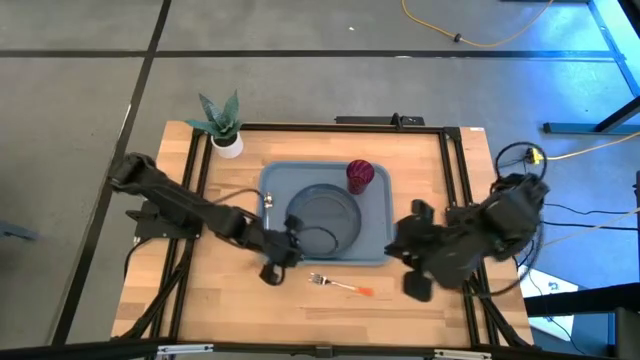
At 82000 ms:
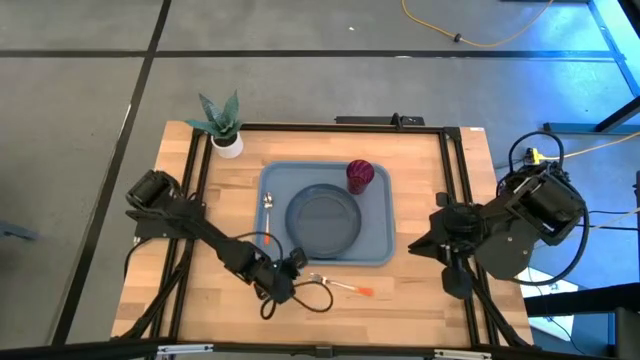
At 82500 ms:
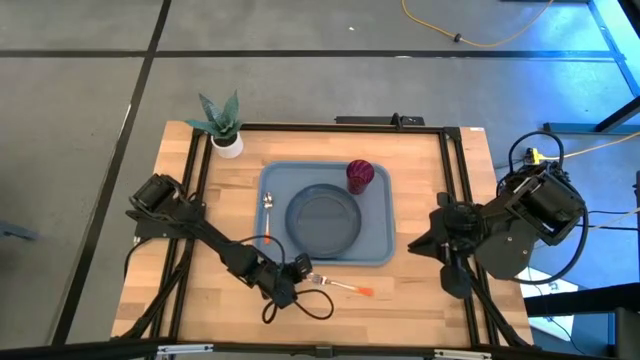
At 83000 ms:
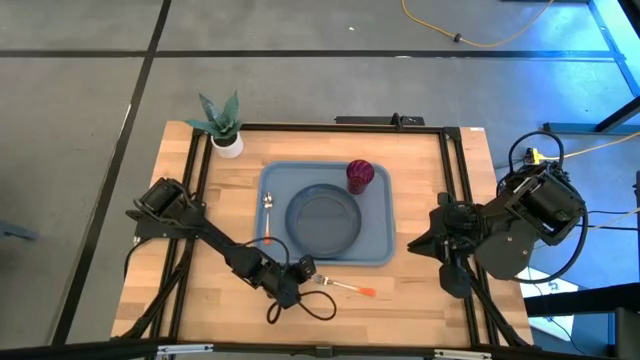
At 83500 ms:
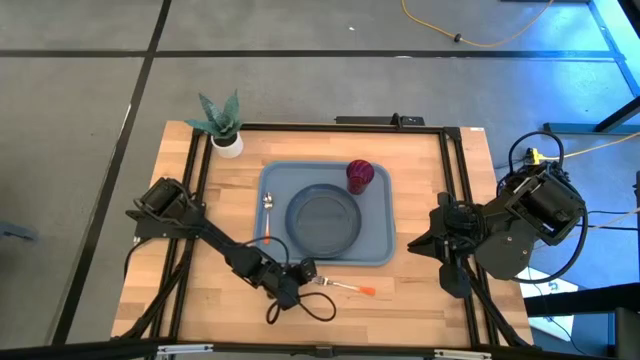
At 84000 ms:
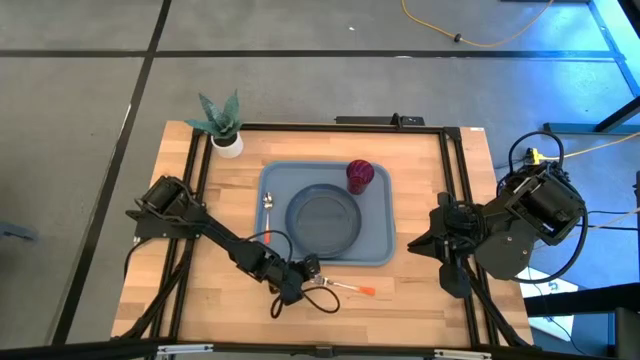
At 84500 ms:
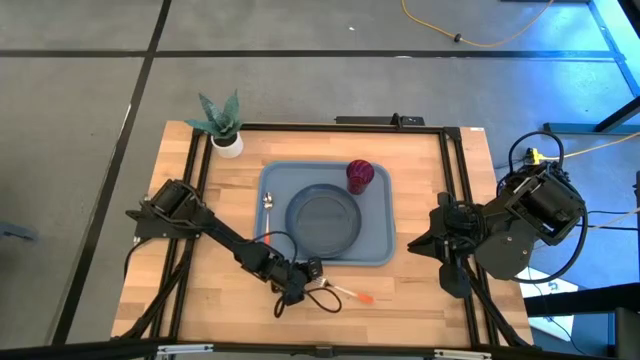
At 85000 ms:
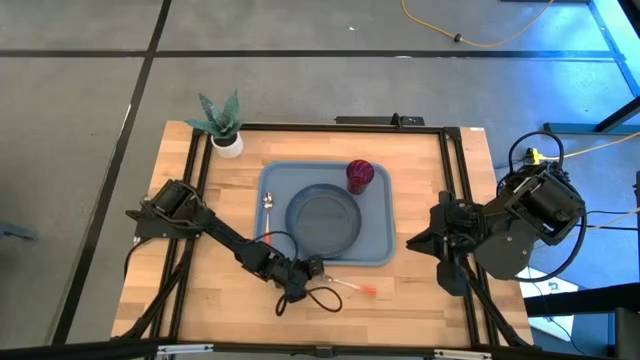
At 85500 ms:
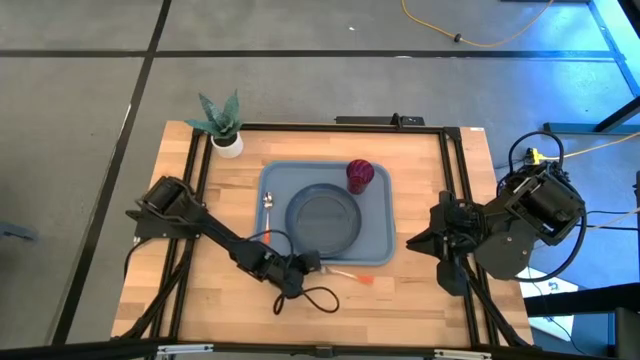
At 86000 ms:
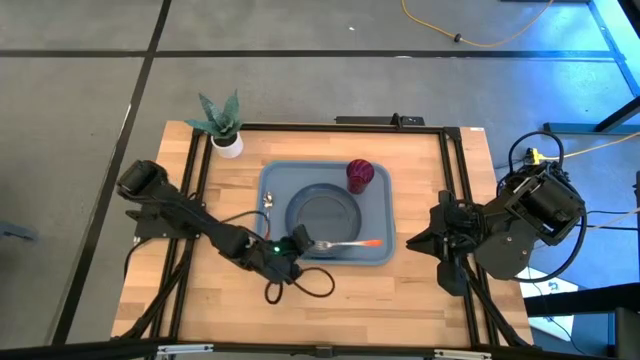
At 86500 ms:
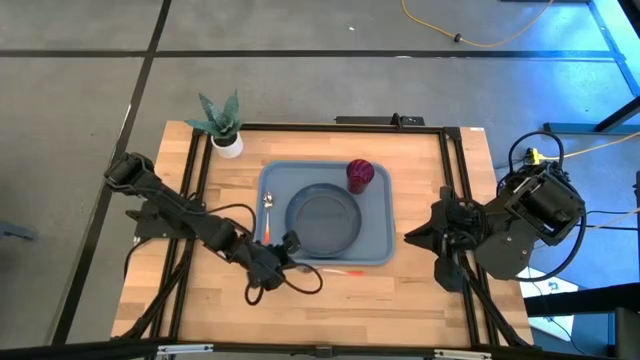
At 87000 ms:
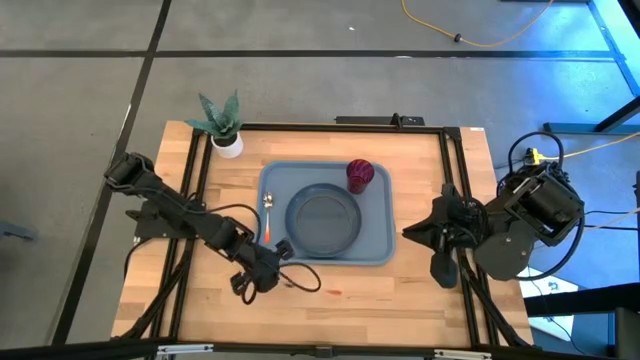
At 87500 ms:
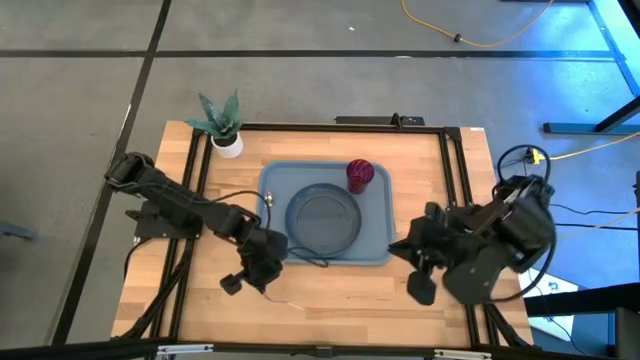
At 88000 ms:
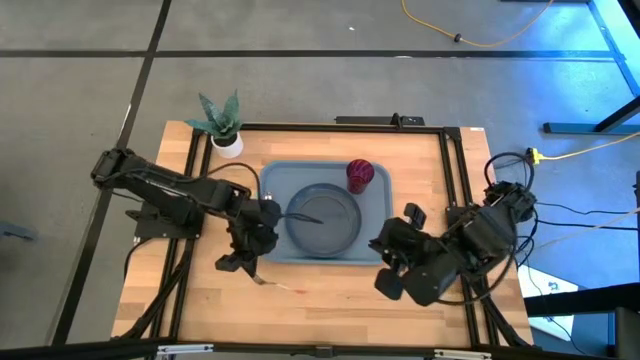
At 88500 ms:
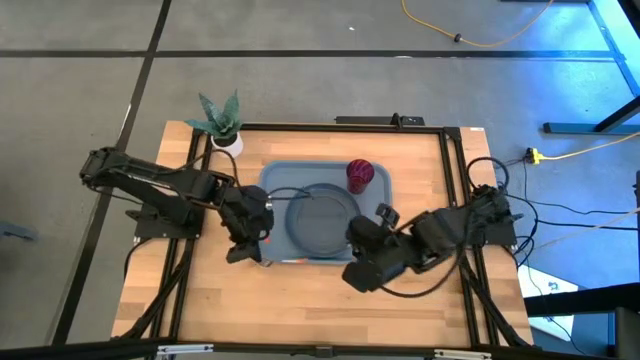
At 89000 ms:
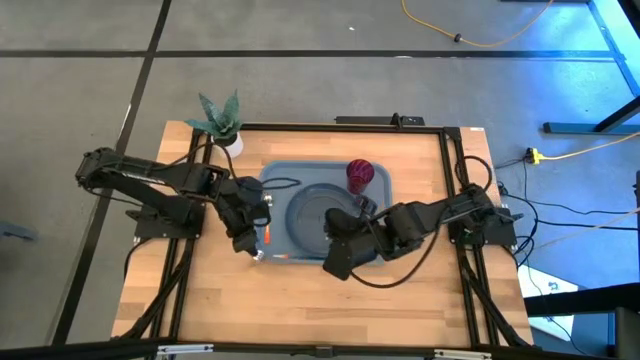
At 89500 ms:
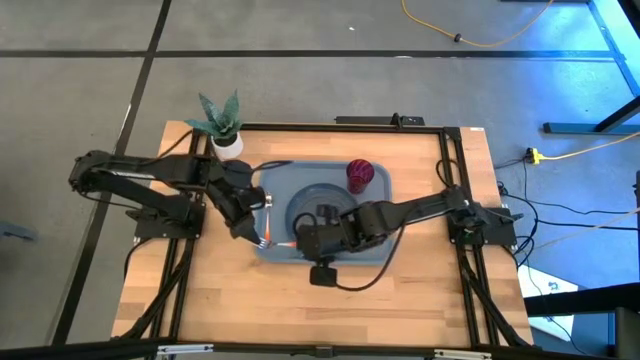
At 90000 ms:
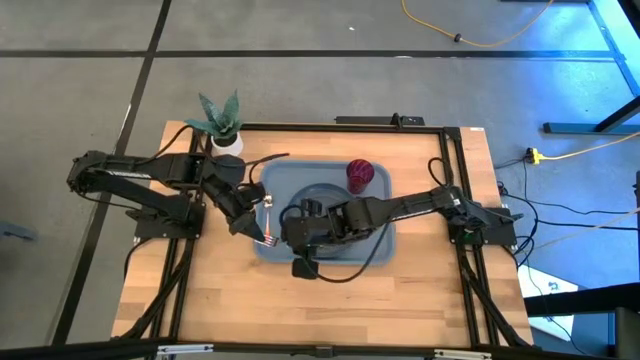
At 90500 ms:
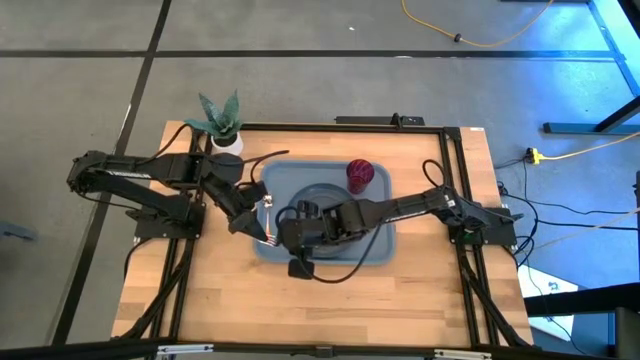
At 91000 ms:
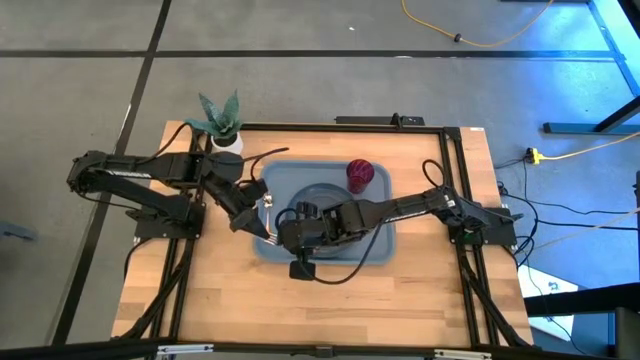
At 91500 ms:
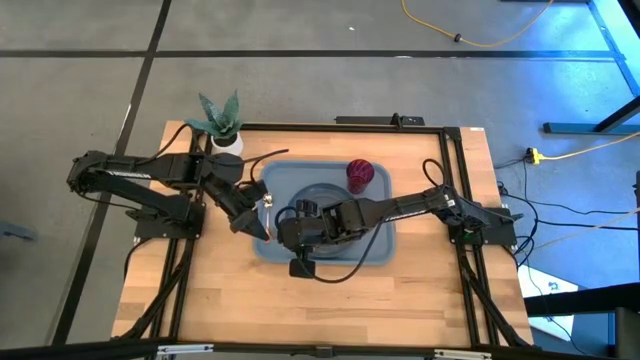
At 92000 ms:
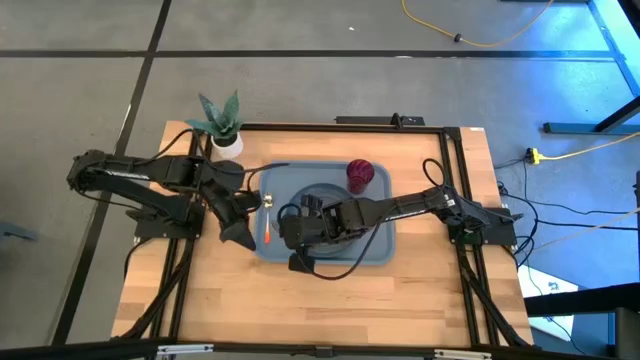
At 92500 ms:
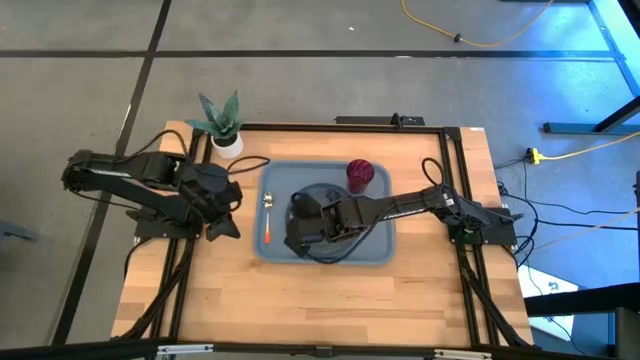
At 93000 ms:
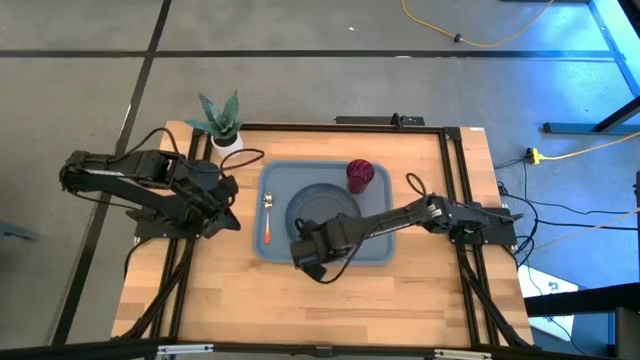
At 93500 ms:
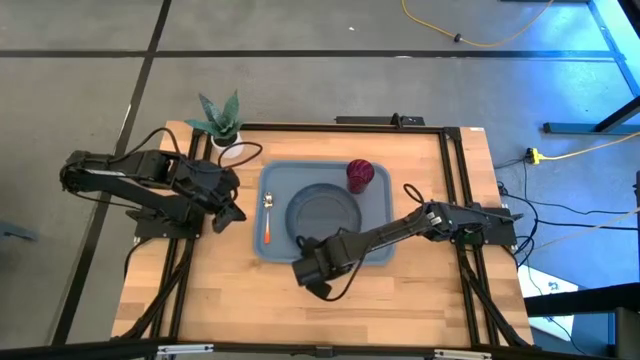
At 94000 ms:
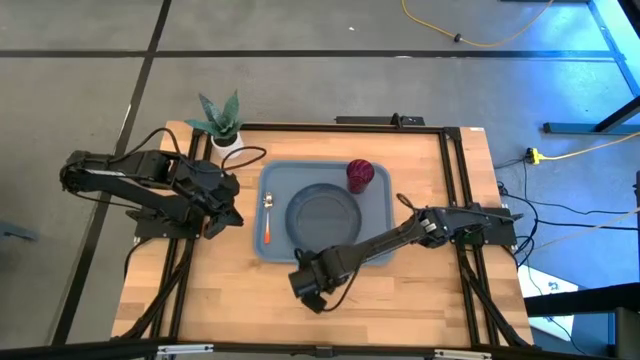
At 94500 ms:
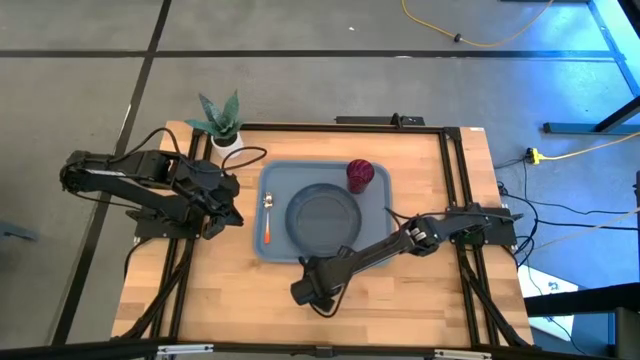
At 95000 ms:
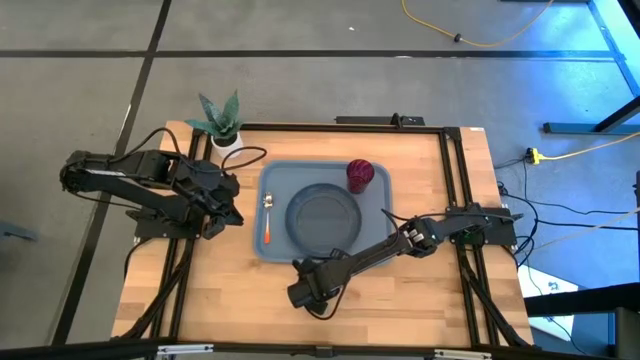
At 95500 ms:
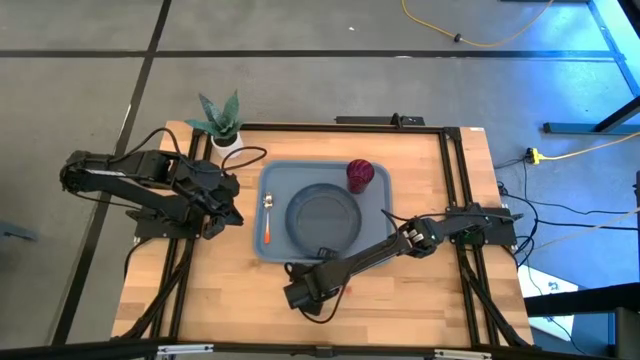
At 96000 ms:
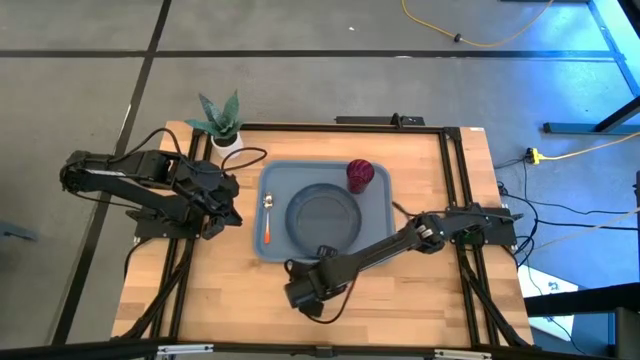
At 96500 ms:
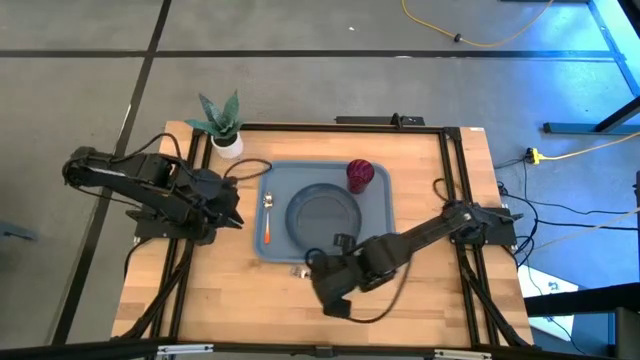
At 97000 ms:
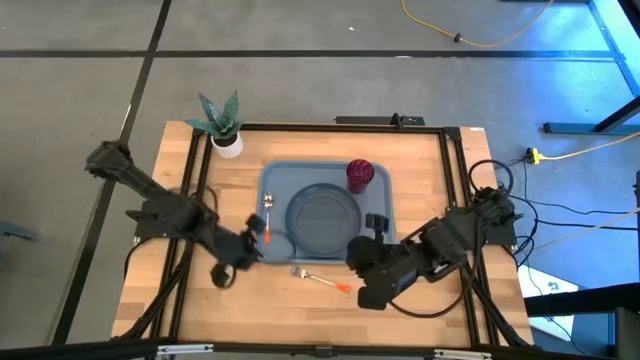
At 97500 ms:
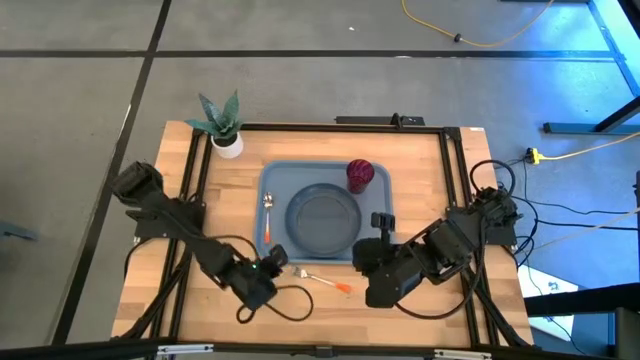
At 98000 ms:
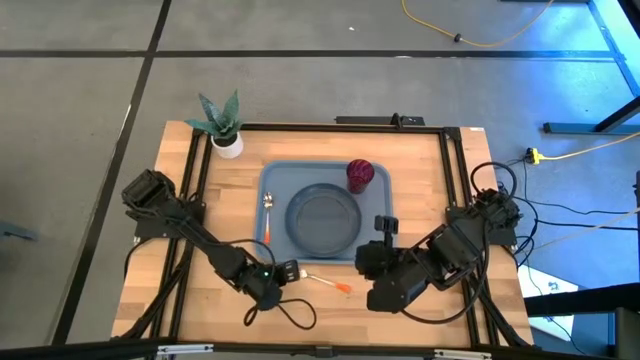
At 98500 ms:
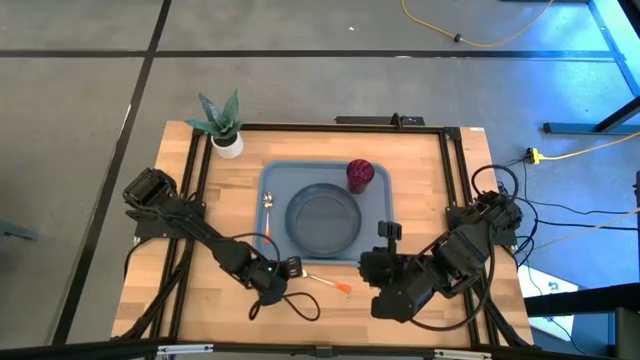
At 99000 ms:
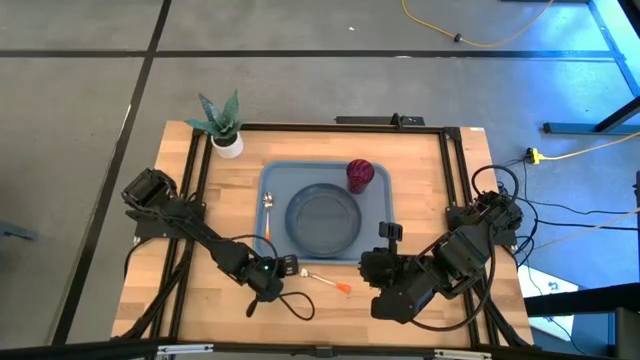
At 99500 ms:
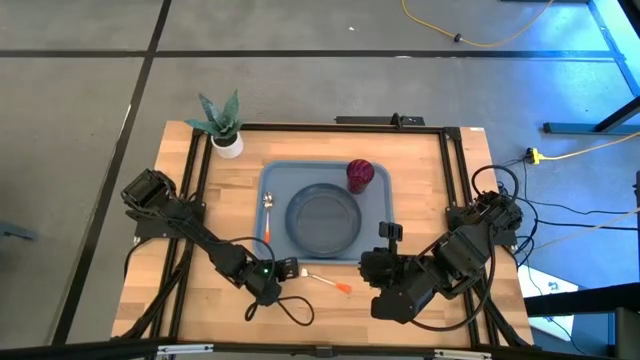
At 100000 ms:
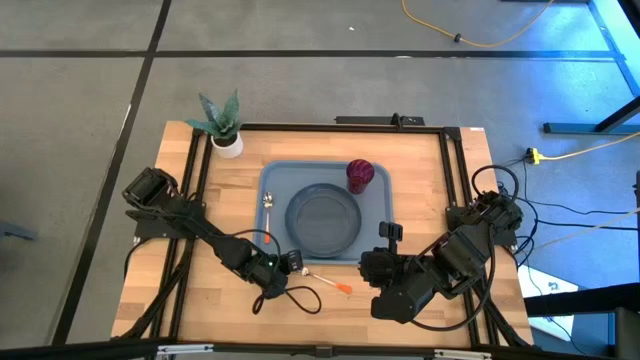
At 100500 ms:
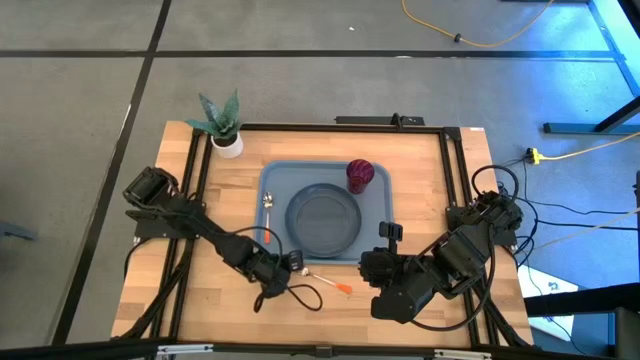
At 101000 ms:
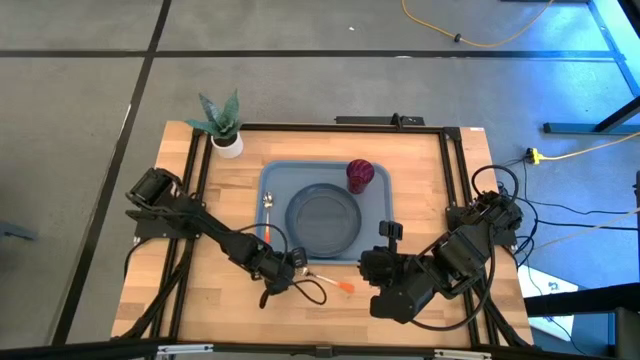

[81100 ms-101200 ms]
Task: Pick and place plate/cup/fork/spoon on tray
Put the orange fork on the blue tray

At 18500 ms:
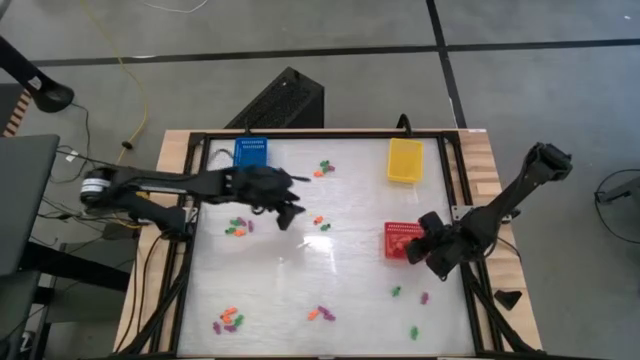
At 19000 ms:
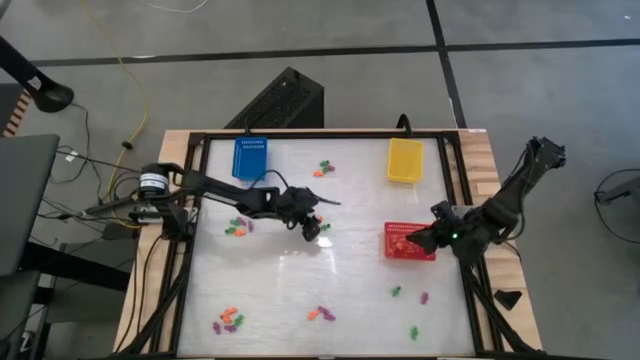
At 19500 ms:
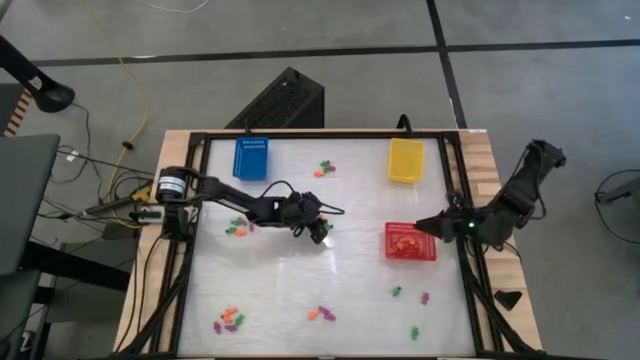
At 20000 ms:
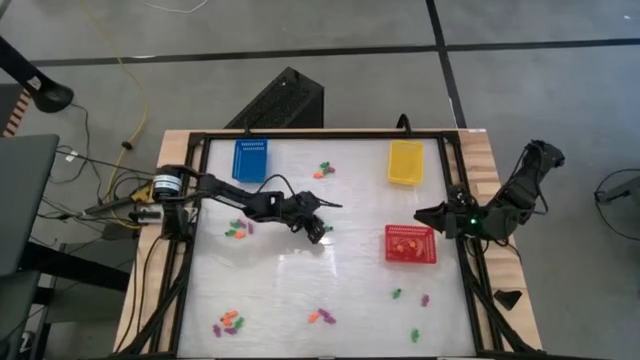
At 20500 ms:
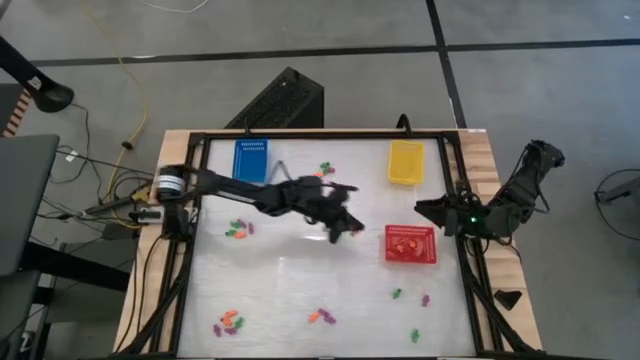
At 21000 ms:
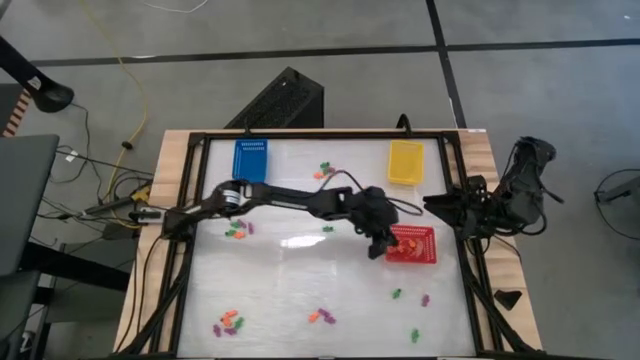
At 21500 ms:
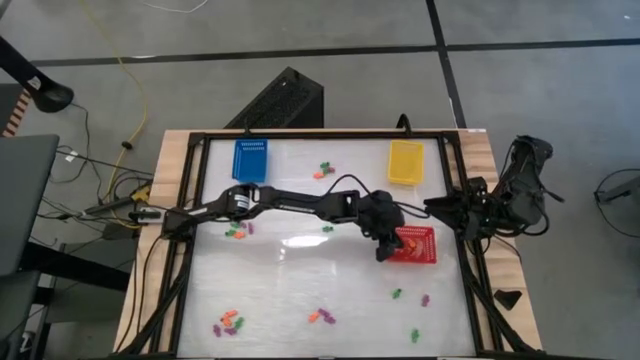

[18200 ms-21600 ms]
Task: Sort Halloween decoration
Put the orange skeleton toy into the red bin
